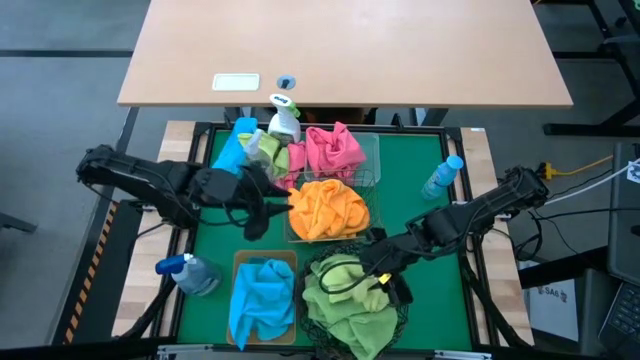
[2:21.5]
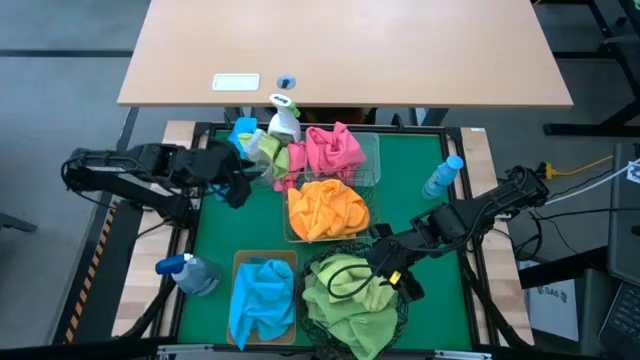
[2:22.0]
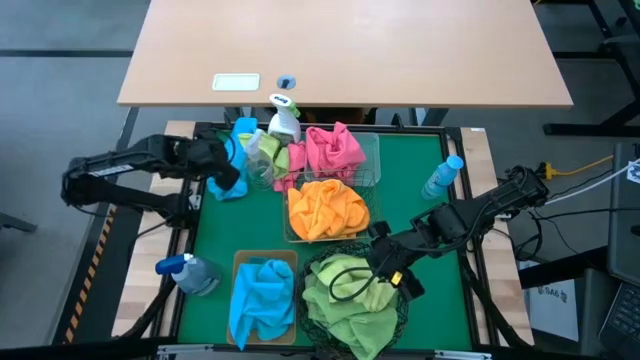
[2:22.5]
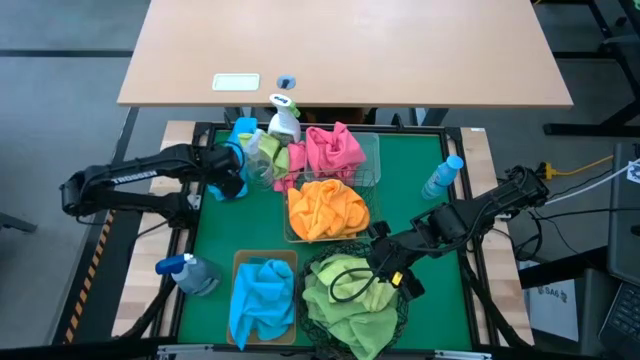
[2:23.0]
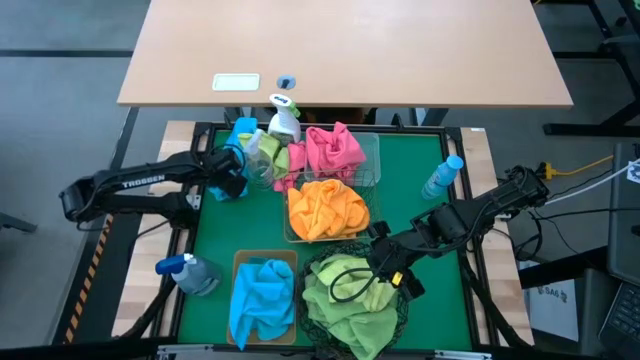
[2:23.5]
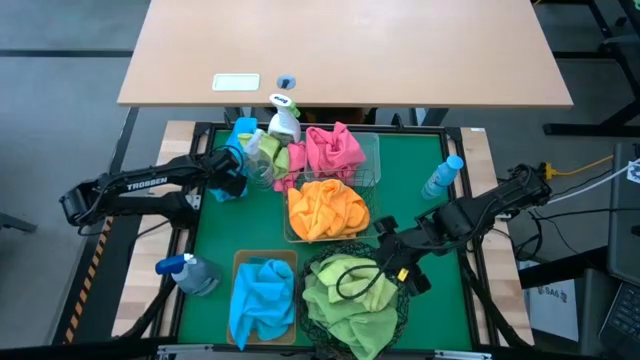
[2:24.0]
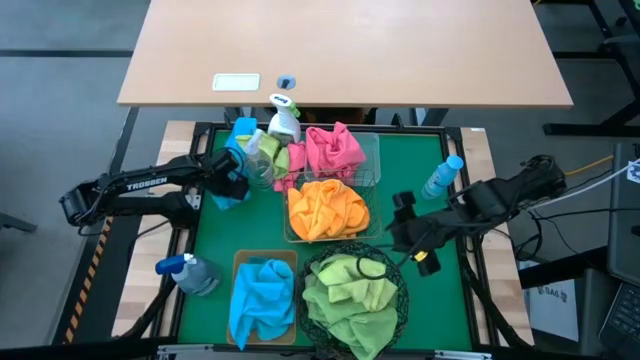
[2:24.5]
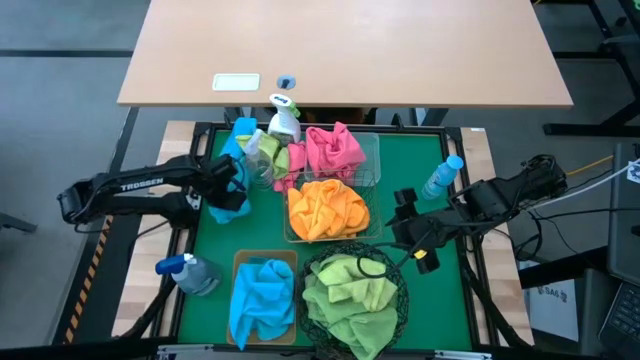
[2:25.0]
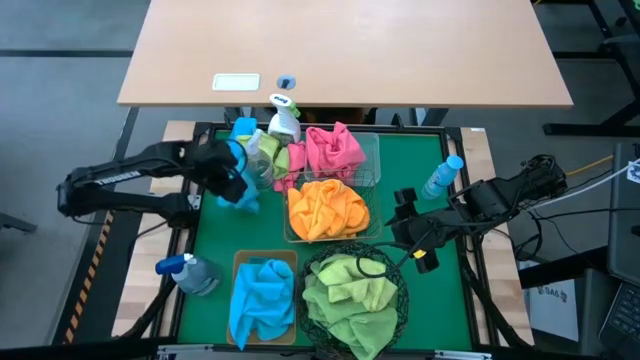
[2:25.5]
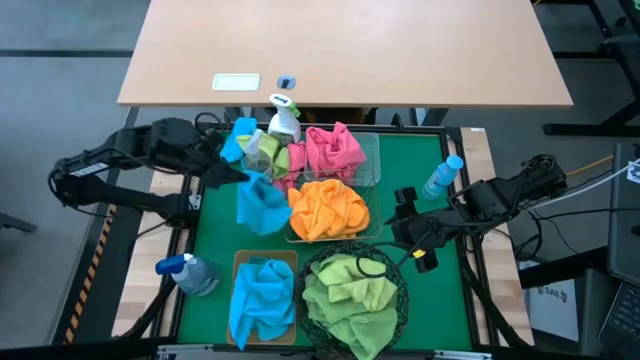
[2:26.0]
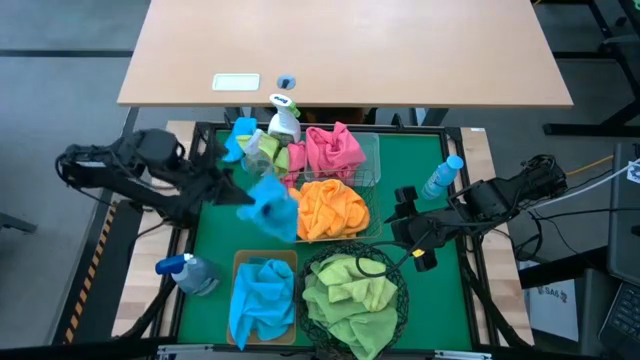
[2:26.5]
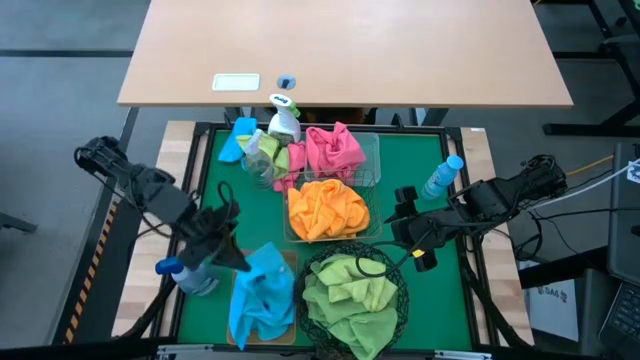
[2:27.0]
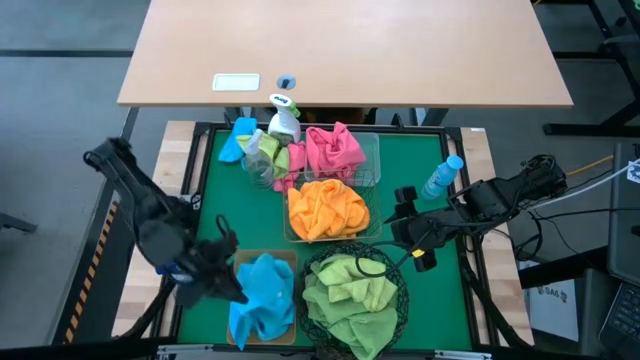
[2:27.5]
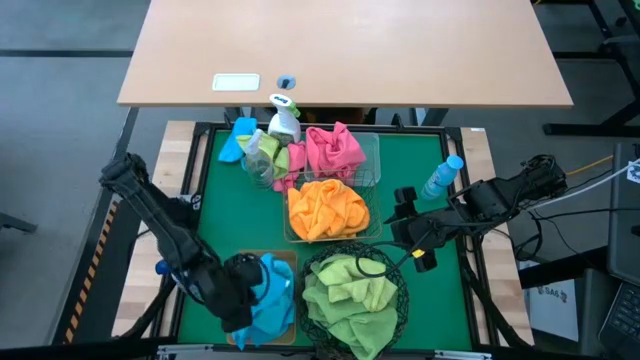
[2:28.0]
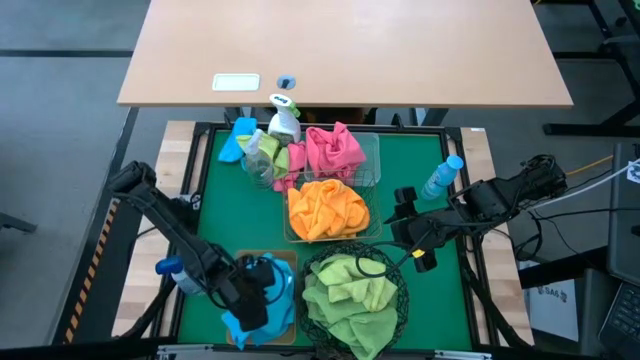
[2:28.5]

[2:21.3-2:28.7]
Task: Sort microfiber towel by color & place in baskets
Put the blue microfiber towel into the orange bin

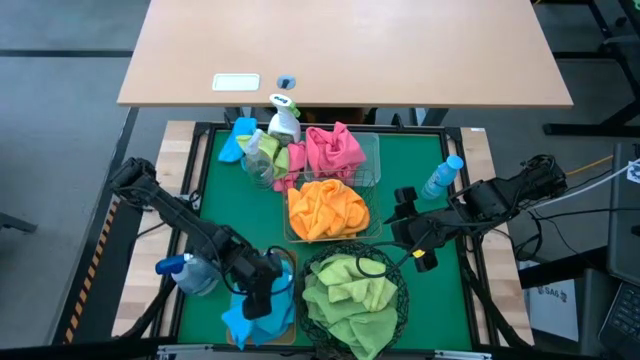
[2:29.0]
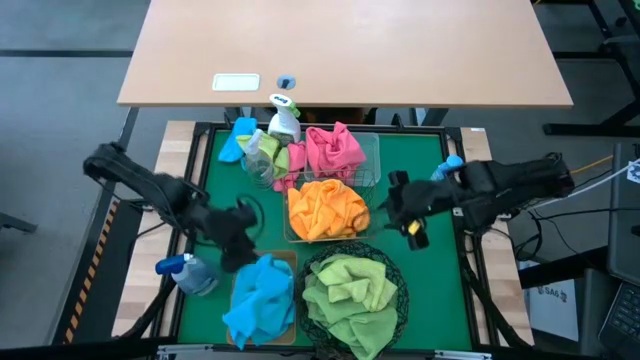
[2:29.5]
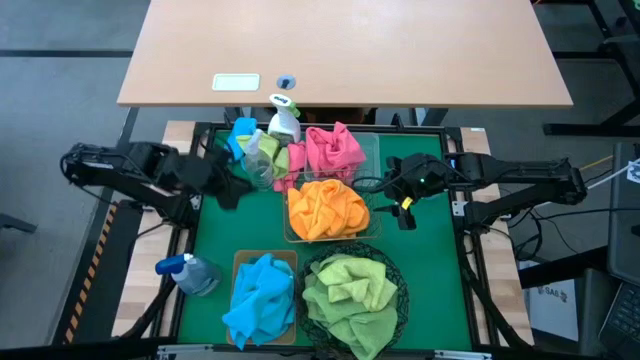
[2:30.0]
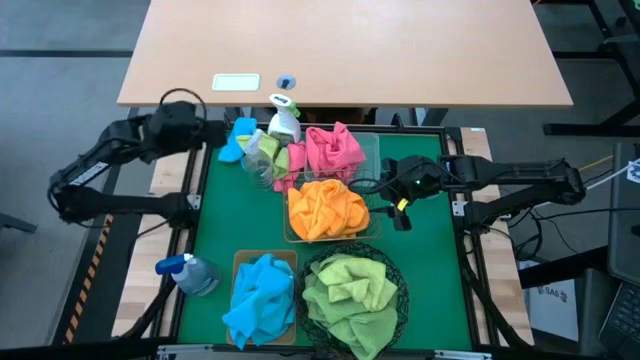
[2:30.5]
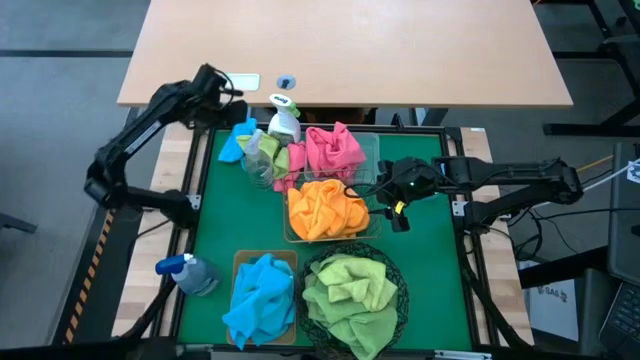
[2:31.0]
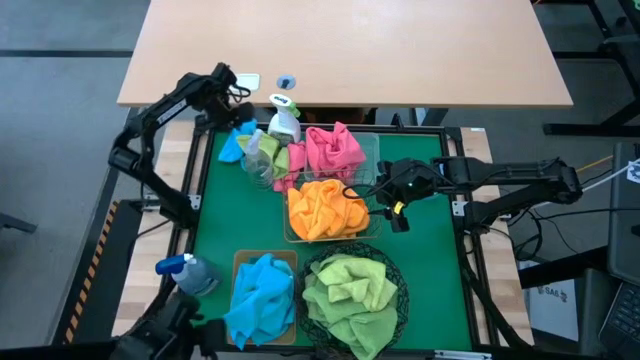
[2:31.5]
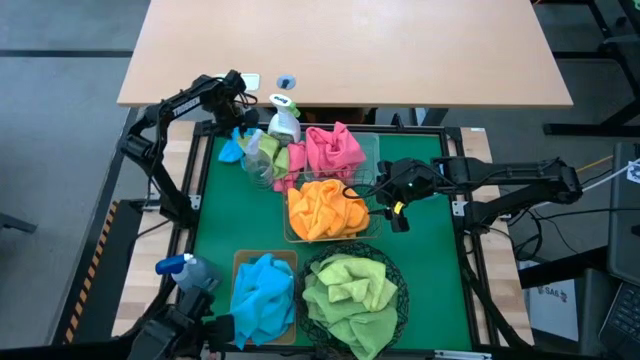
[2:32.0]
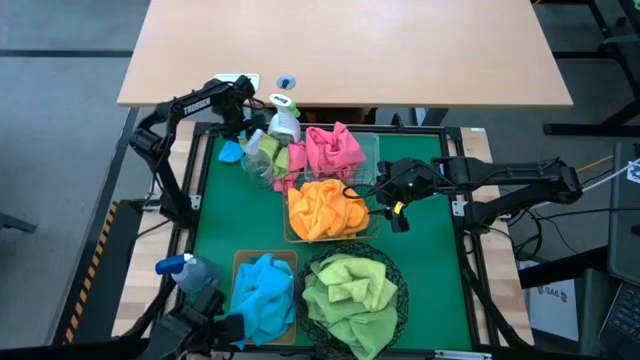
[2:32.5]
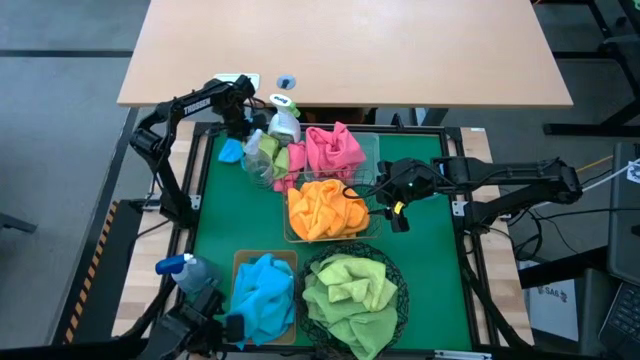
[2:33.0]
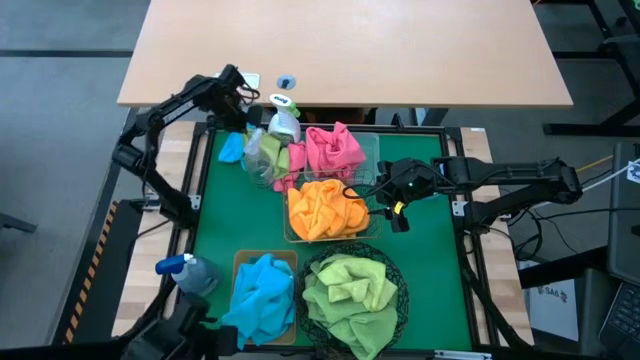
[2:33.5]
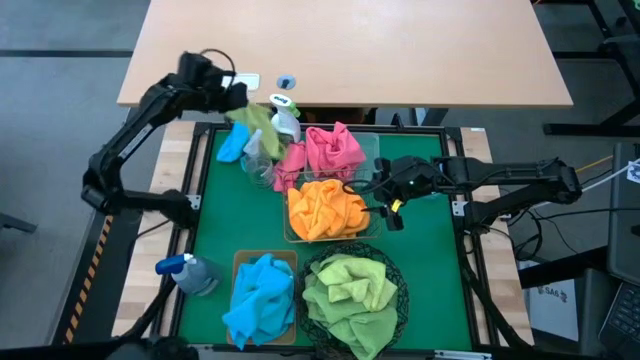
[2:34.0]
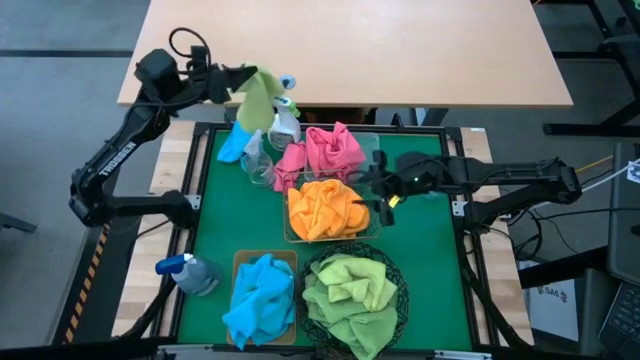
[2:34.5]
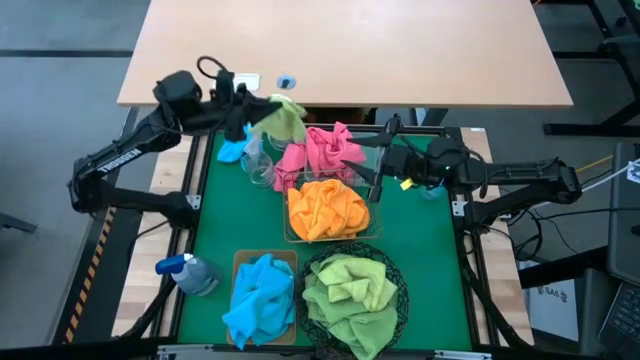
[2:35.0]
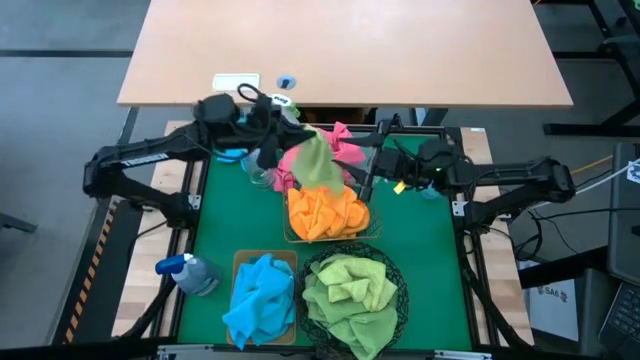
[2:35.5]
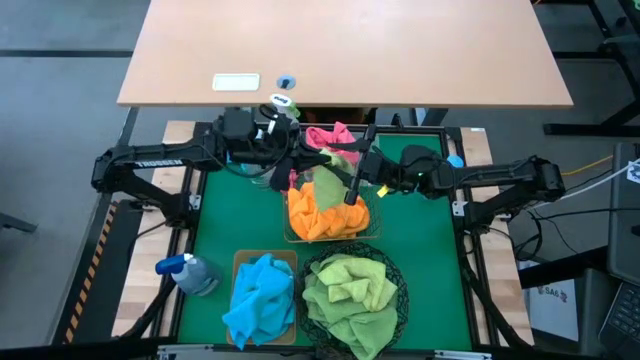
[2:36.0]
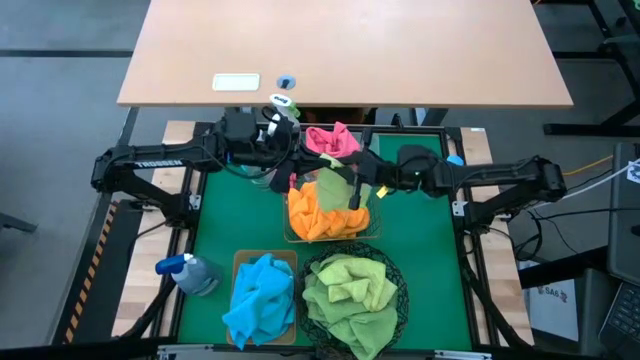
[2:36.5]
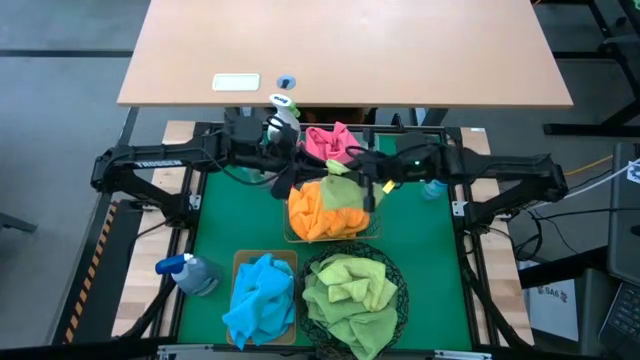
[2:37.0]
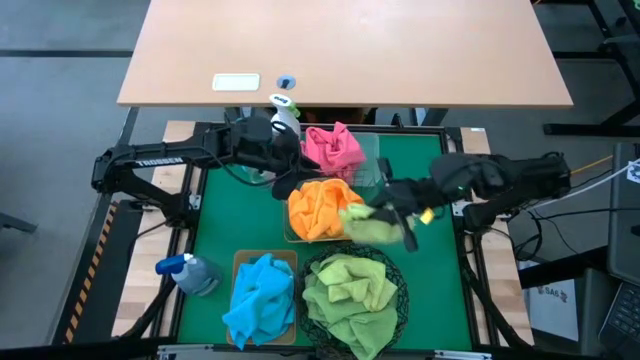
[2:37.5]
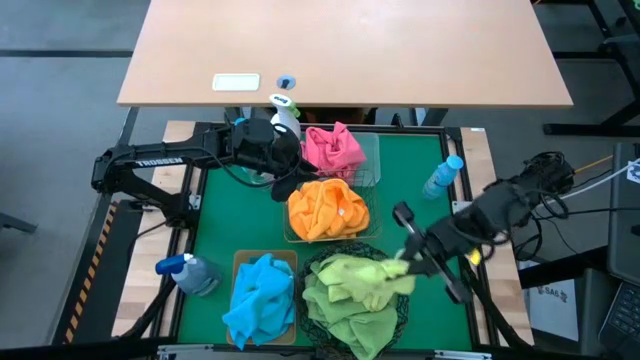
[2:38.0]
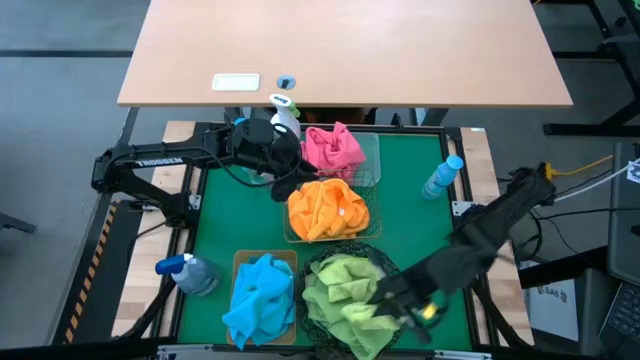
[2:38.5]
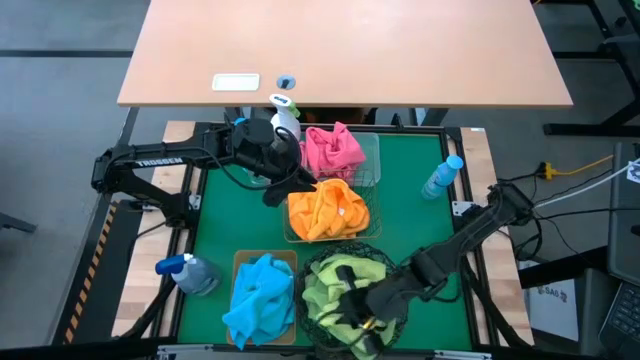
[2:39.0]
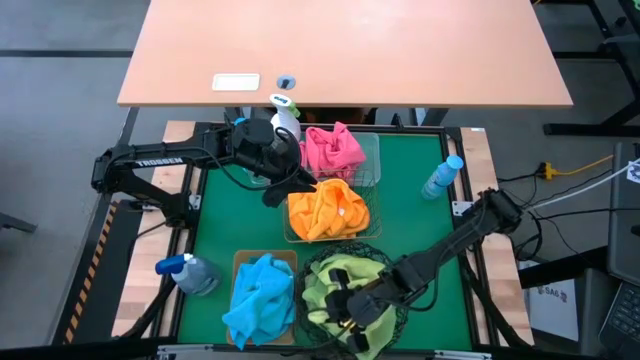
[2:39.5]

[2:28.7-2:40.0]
Put the green microfiber towel into the black wire basket

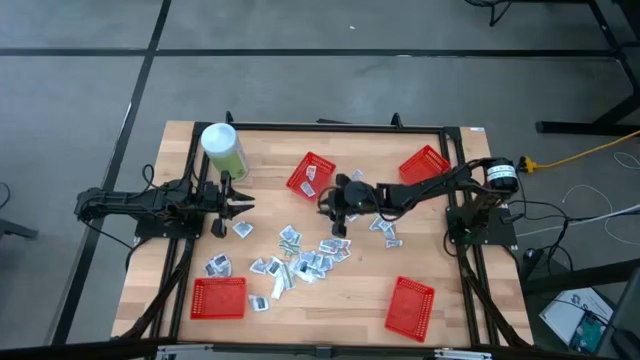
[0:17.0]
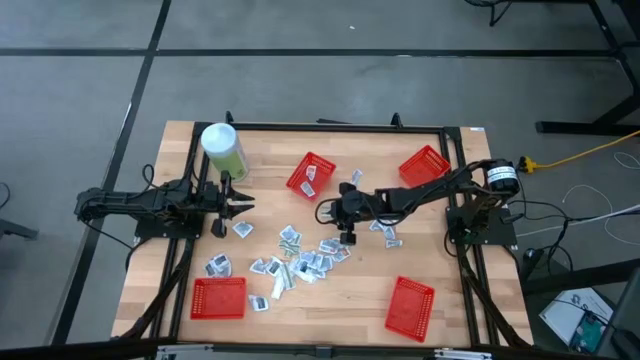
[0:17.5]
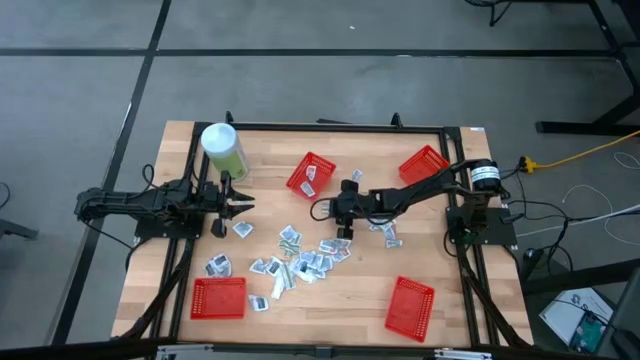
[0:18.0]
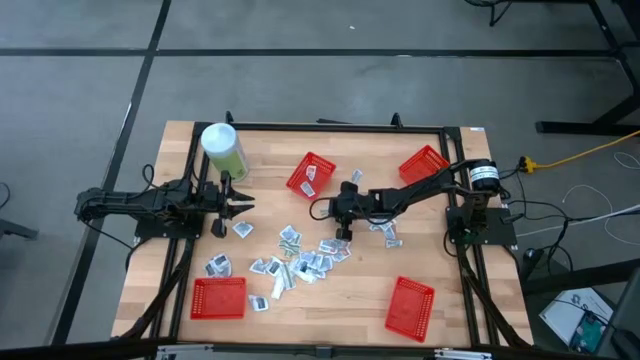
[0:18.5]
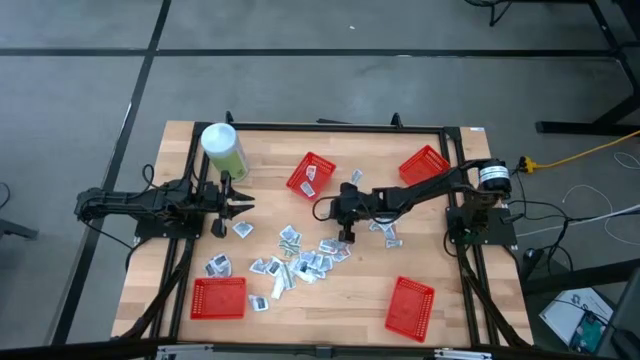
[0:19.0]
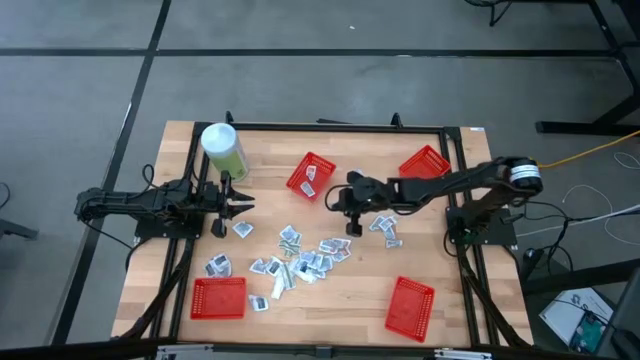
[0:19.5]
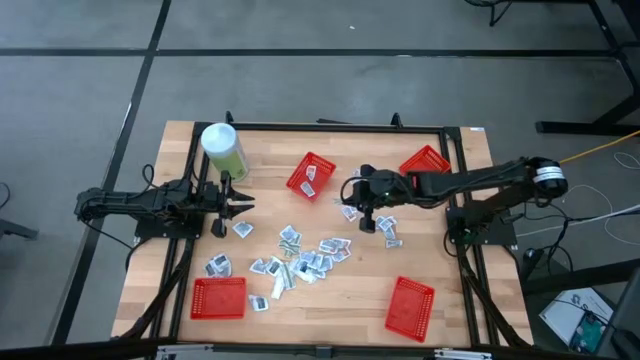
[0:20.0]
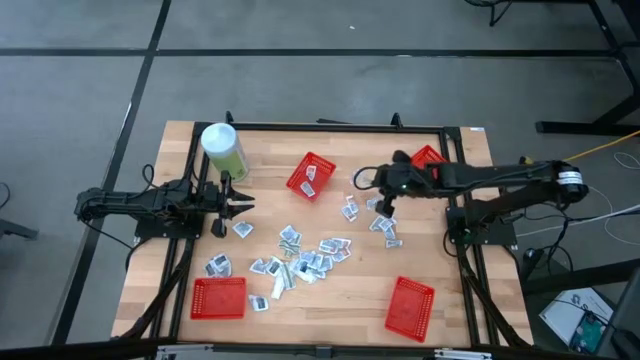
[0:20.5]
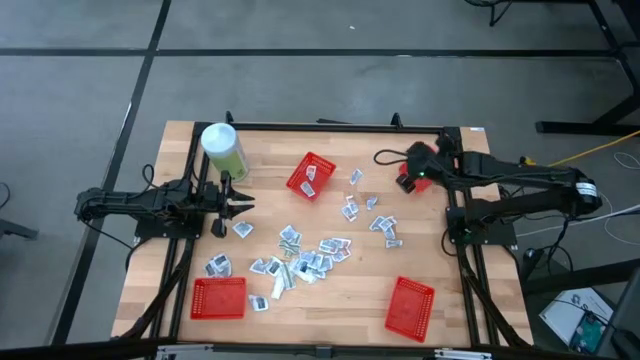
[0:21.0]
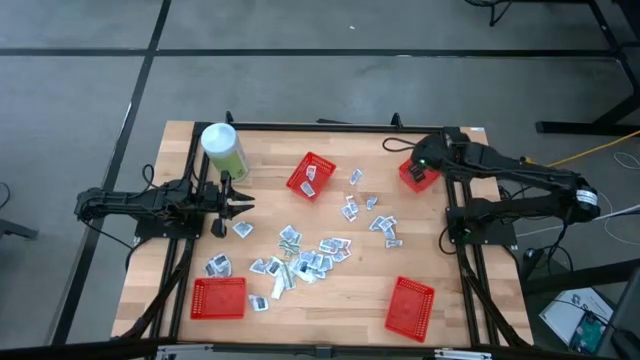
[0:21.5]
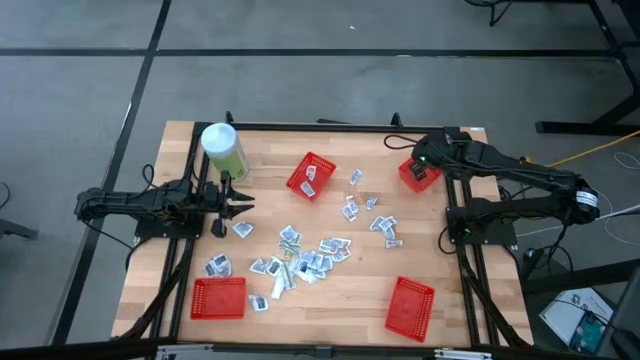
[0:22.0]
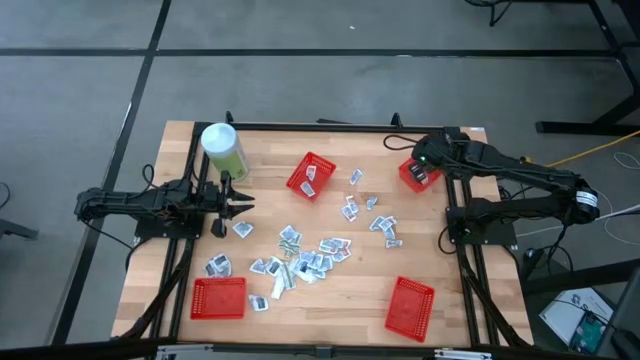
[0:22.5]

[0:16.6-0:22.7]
Task: Pick & Place First Aid Supplies
Put the green bandage into the red container
